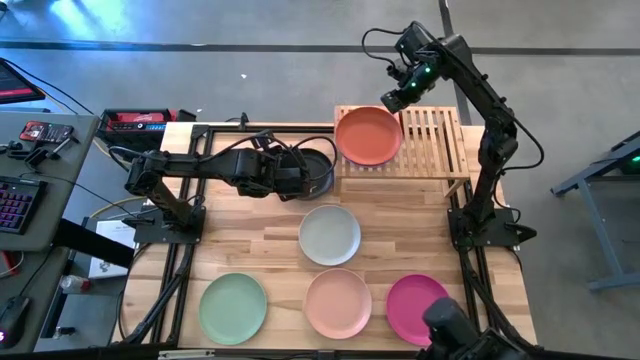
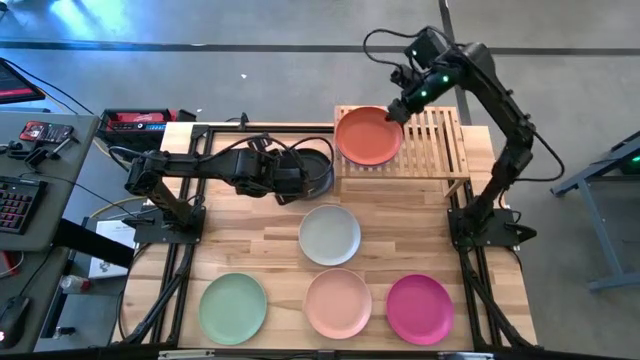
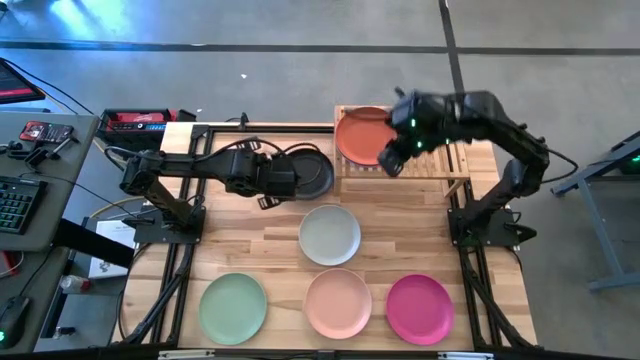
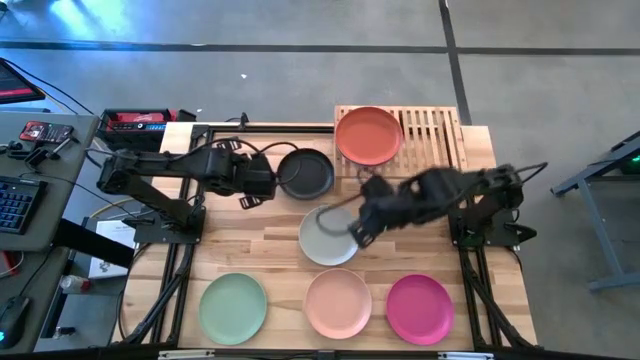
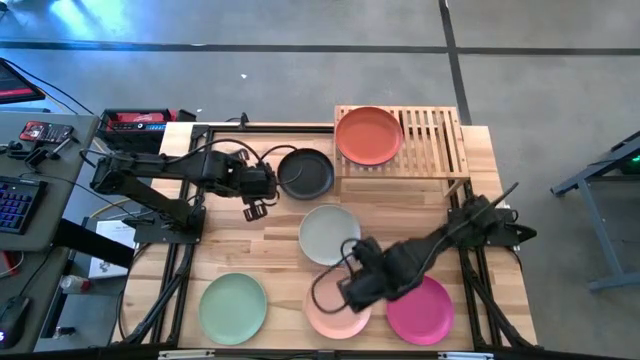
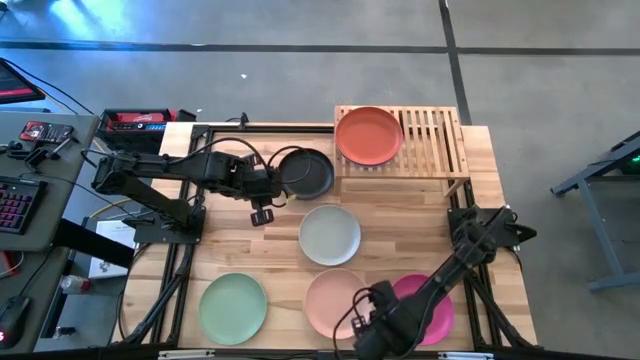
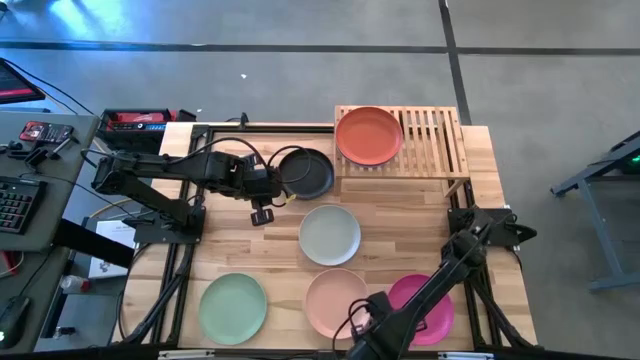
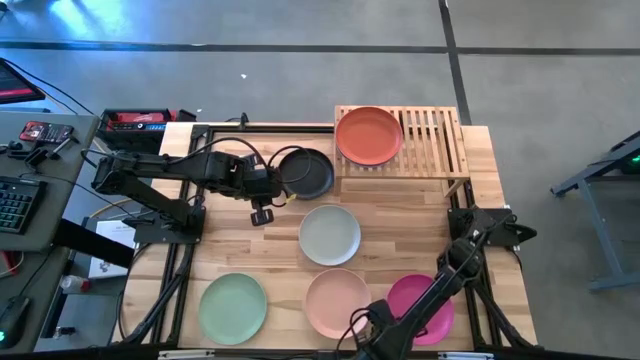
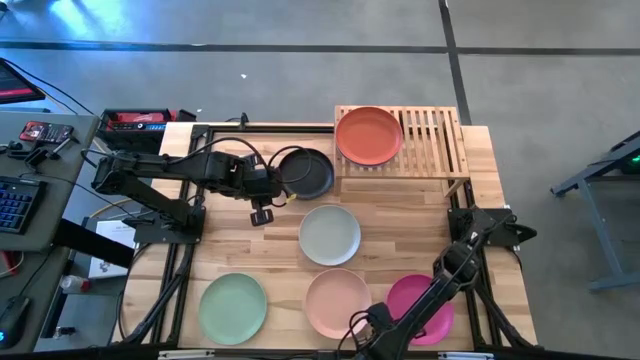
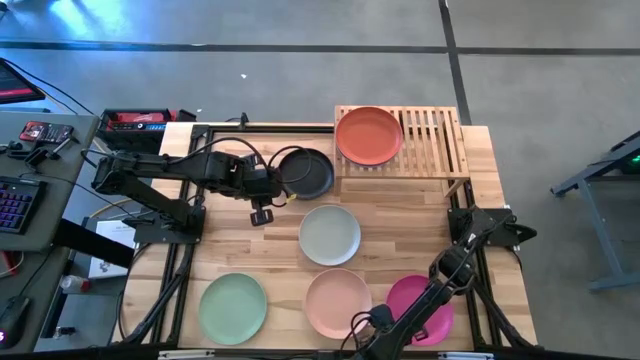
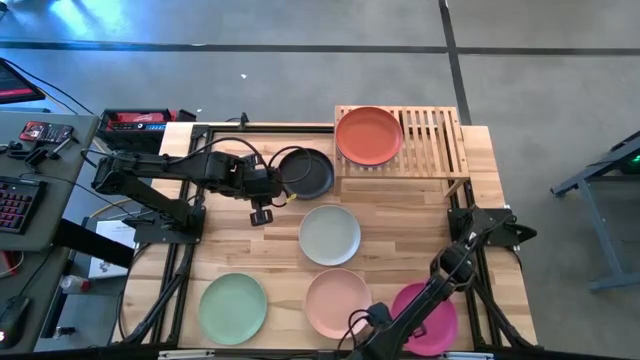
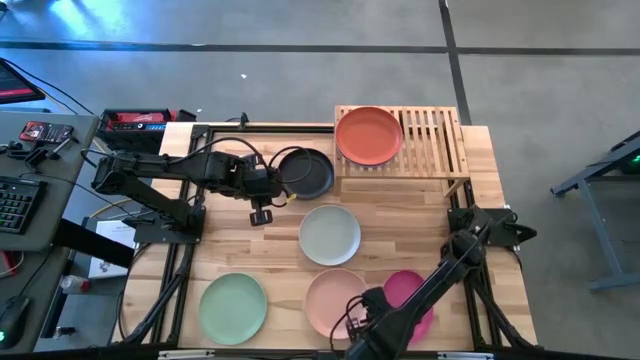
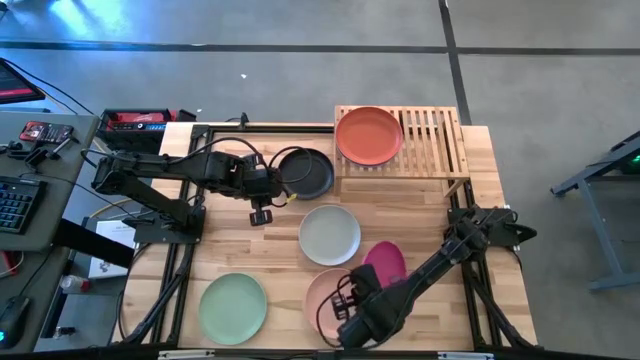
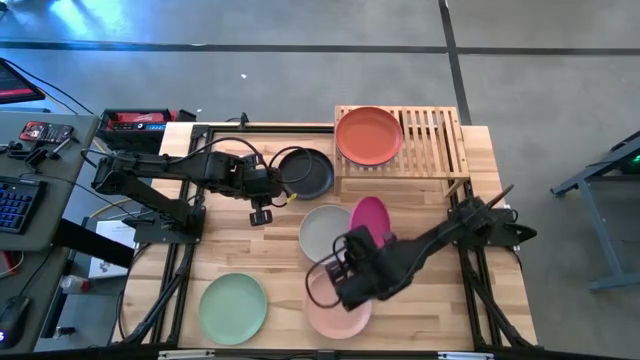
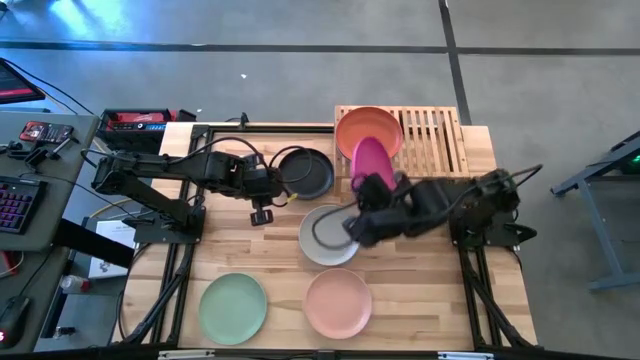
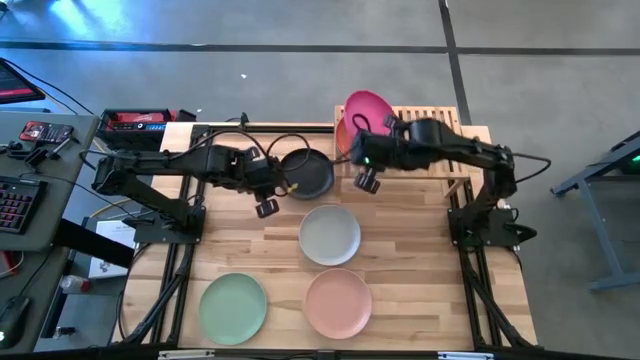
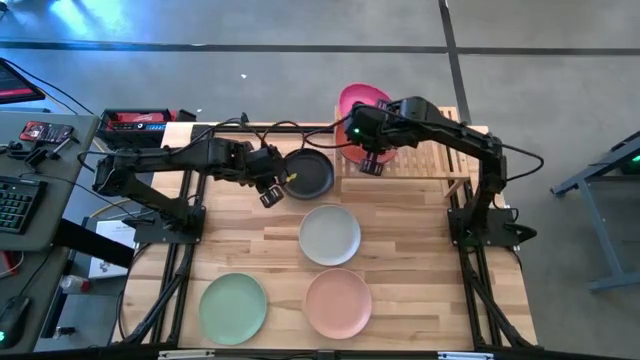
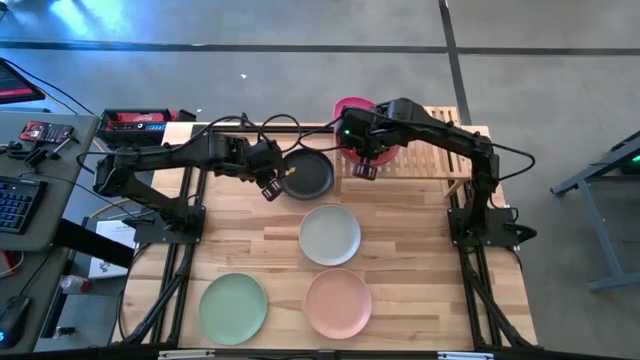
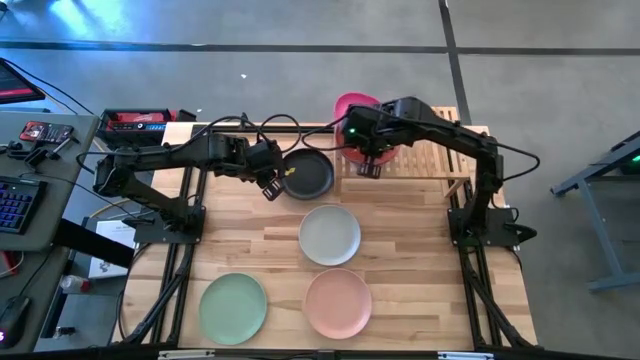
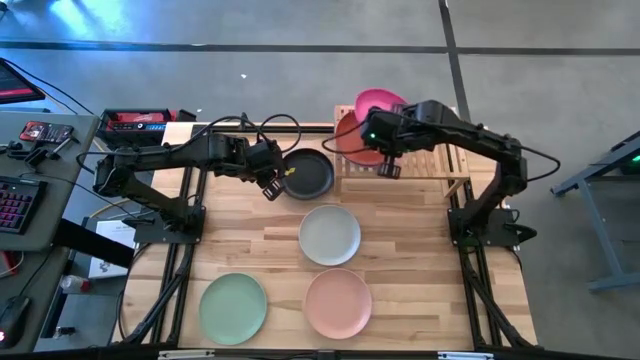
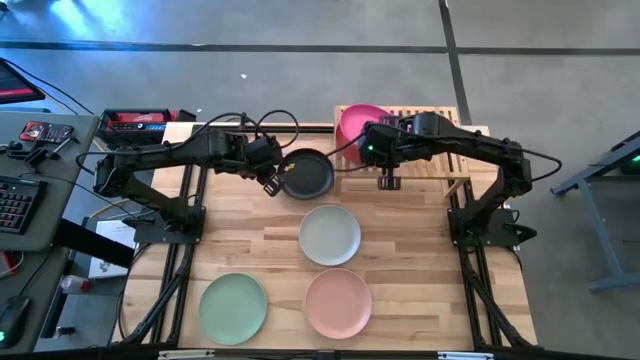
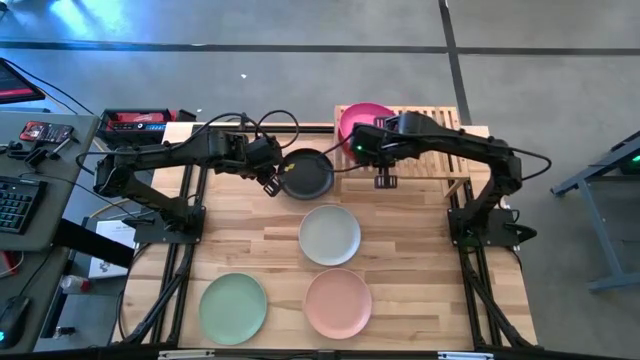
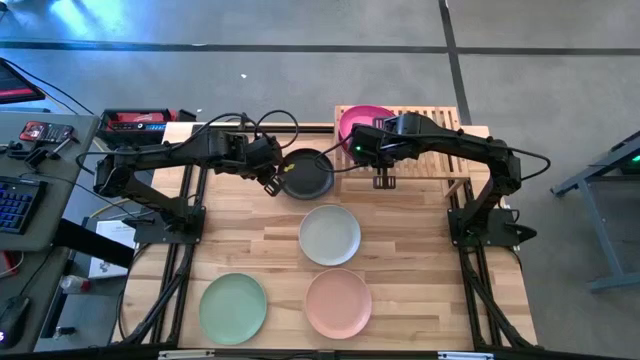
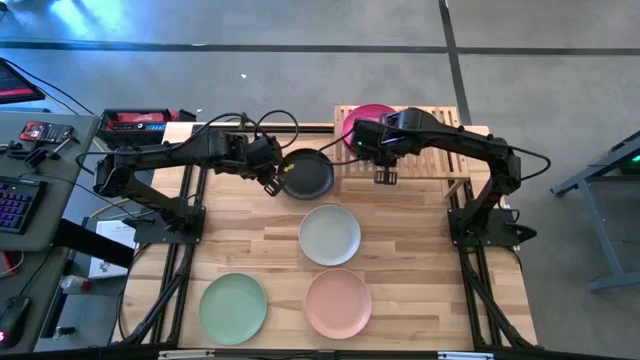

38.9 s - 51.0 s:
Task: Place and stack plates onto a shelf
Stack the pink plate on top of the orange plate on the shelf

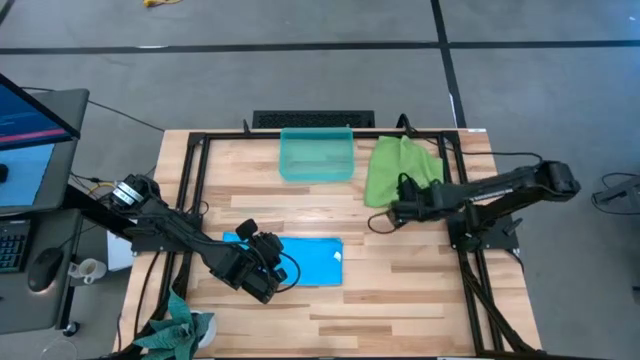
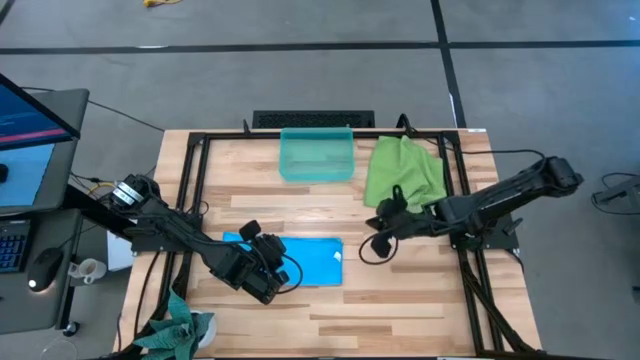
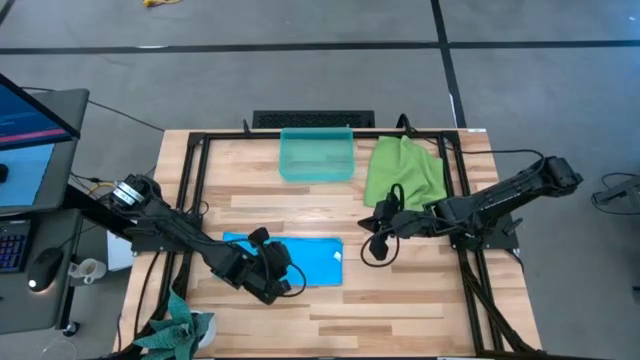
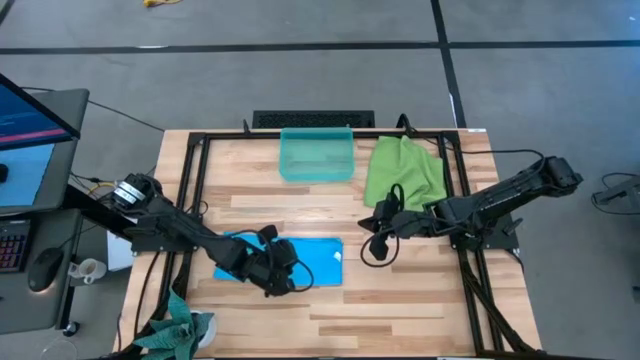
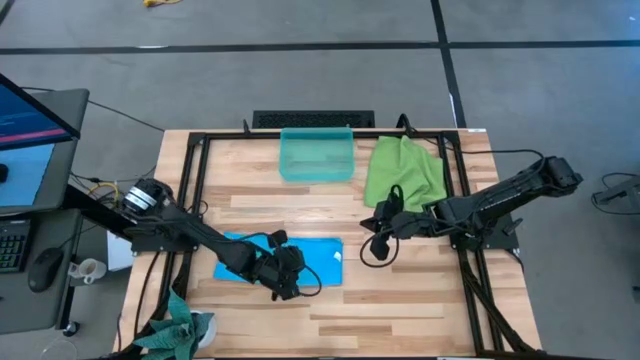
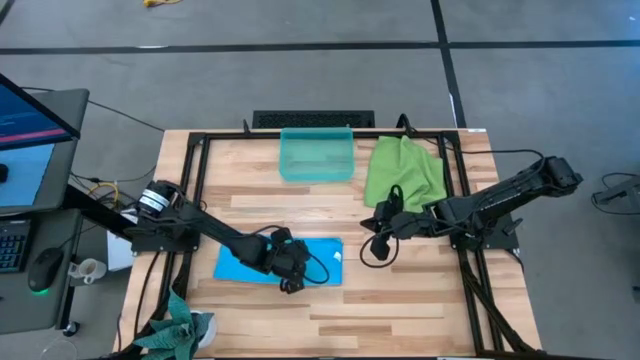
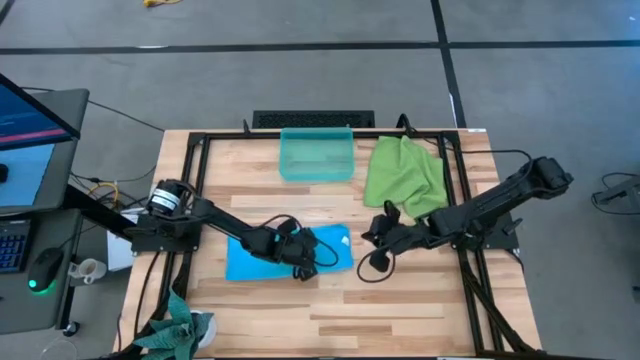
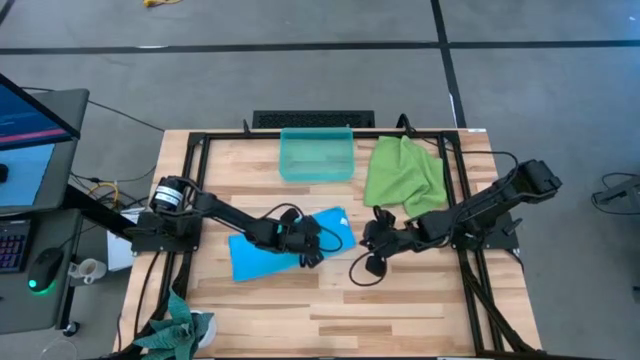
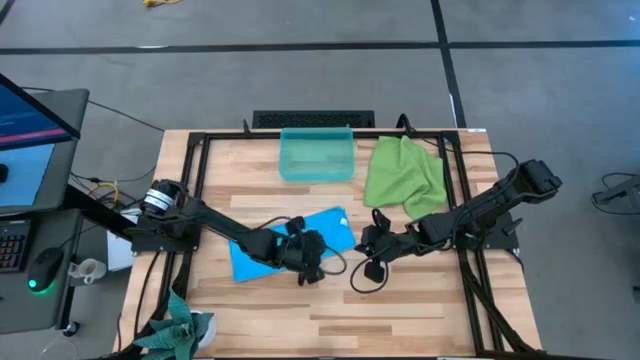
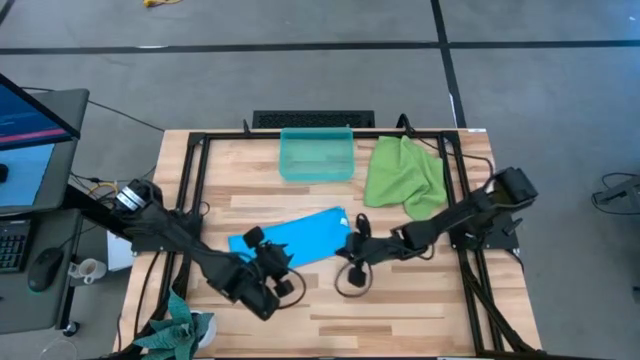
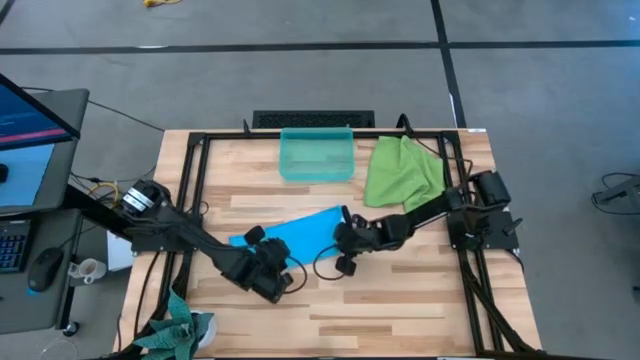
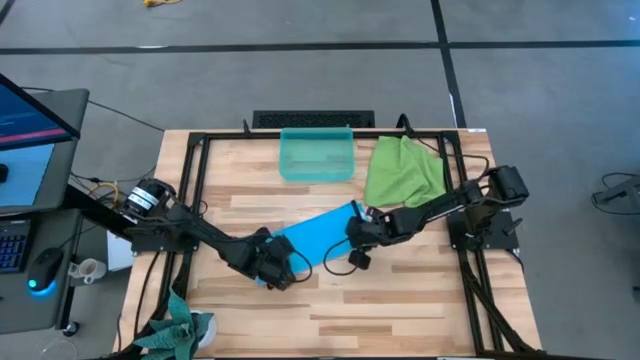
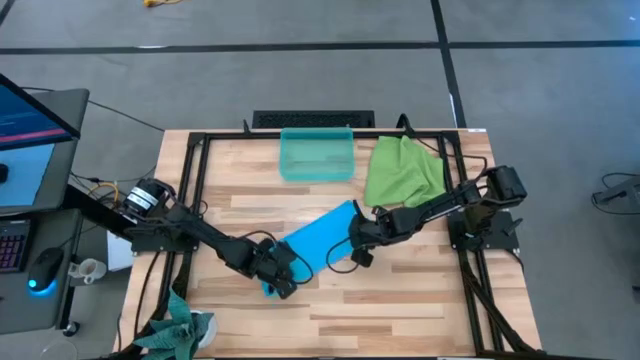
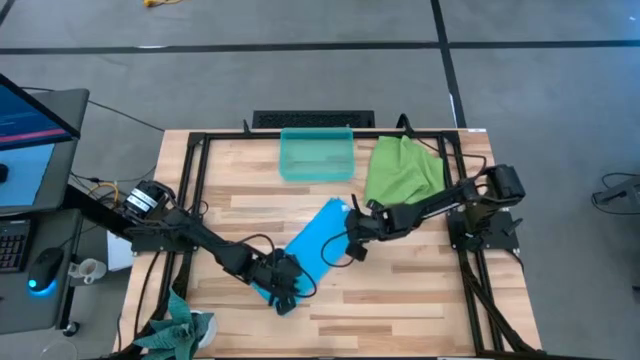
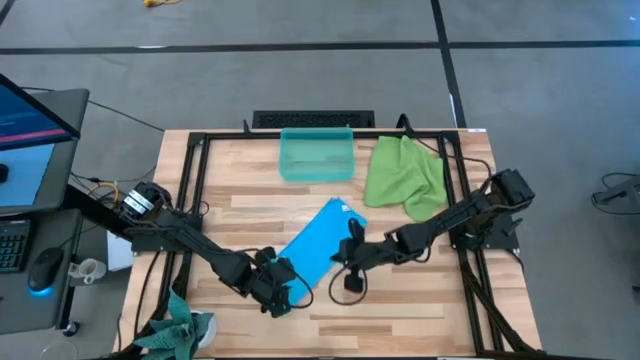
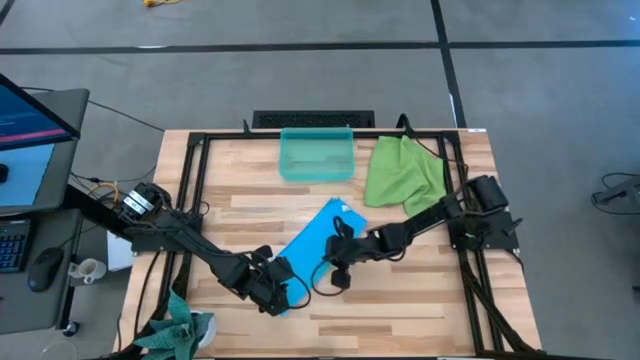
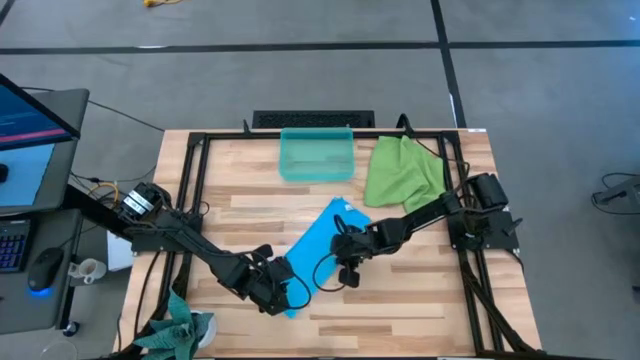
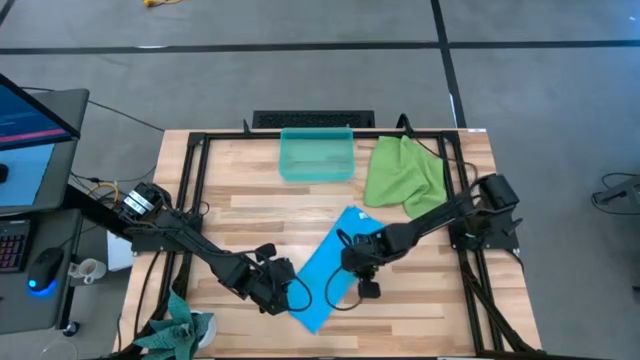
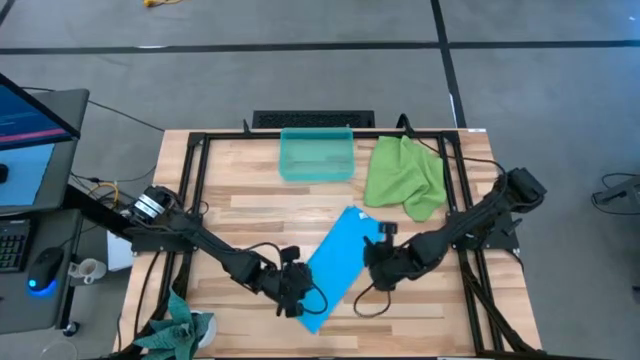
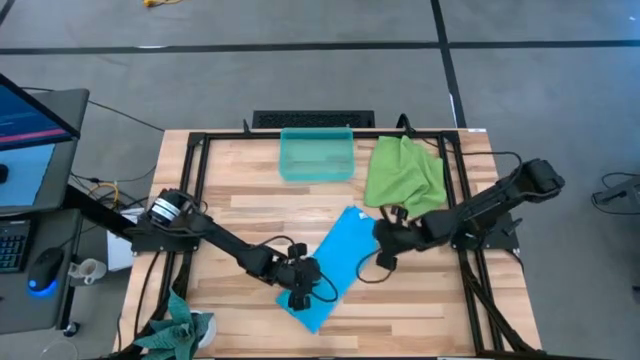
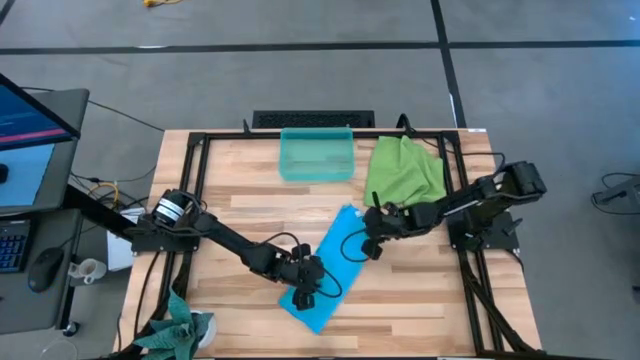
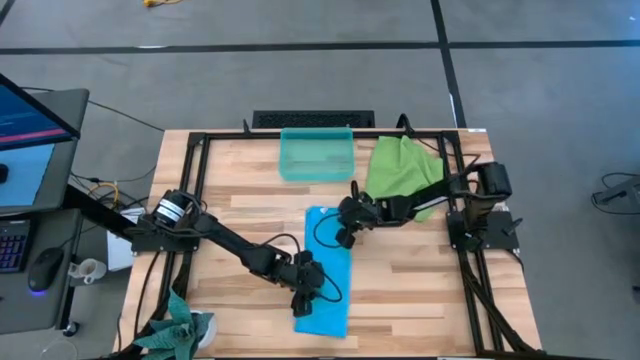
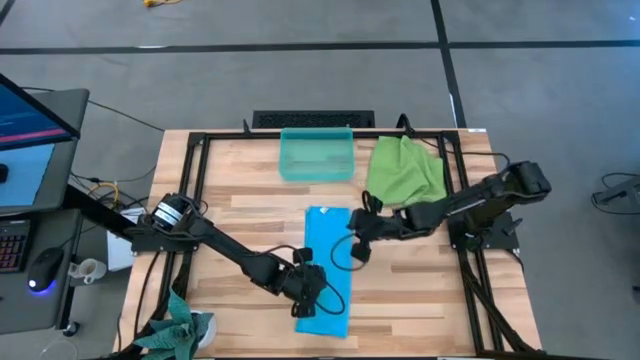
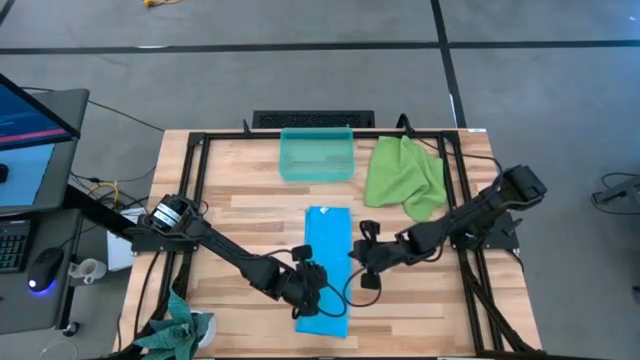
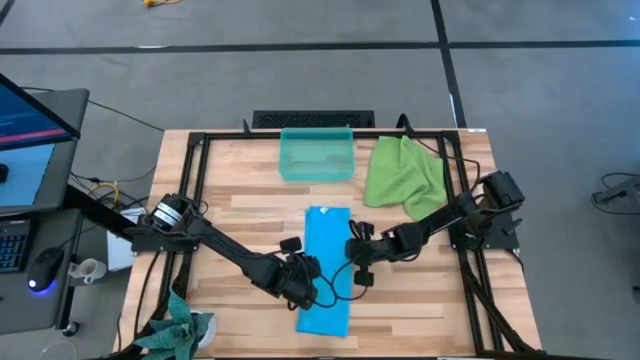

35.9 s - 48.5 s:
Task: Roll microfiber towels into tight, uniform cylinder then place into a basket
Fold the blue microfiber cloth
